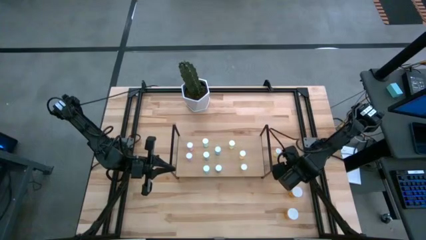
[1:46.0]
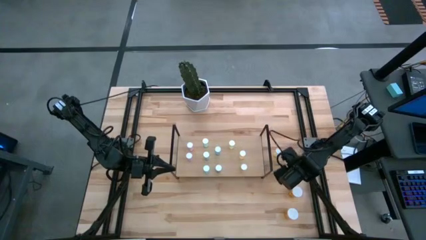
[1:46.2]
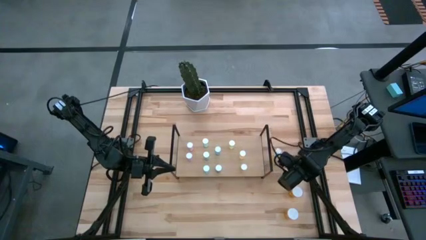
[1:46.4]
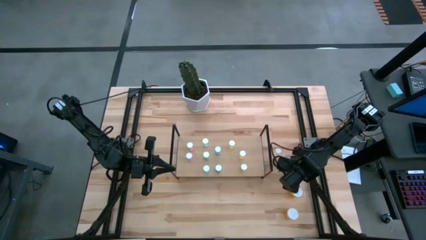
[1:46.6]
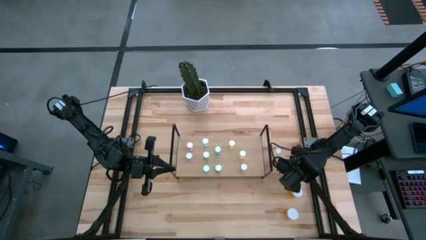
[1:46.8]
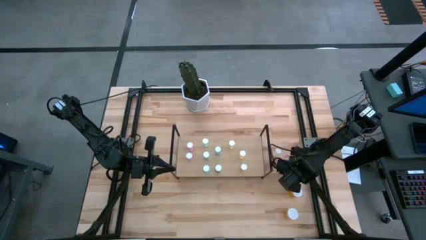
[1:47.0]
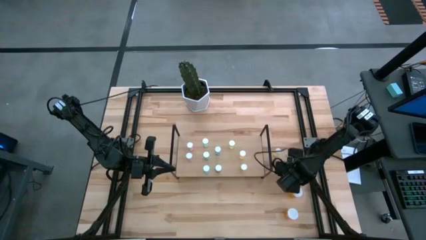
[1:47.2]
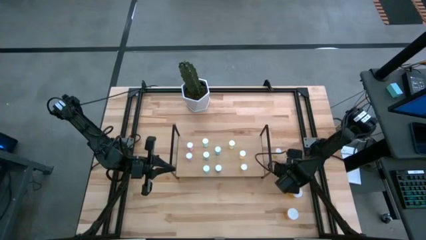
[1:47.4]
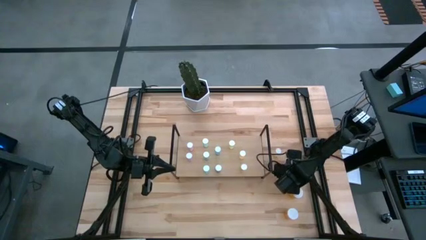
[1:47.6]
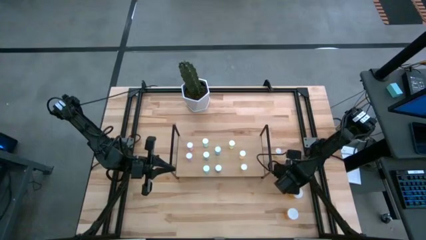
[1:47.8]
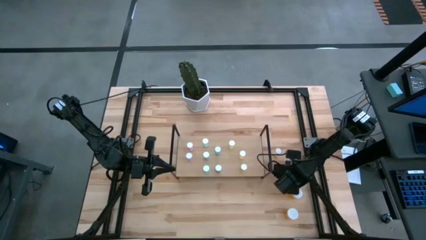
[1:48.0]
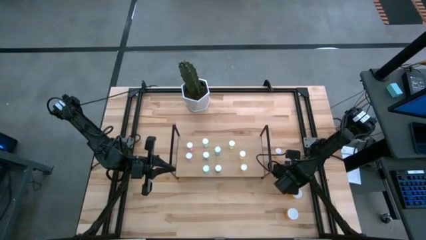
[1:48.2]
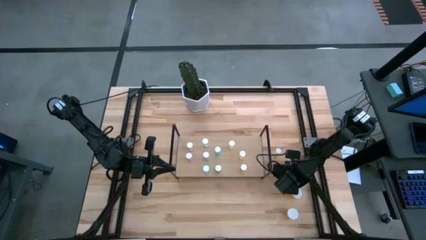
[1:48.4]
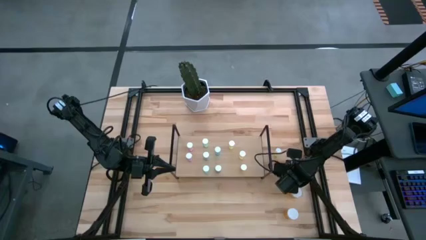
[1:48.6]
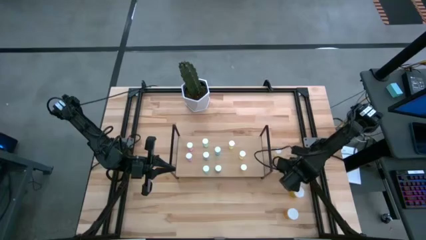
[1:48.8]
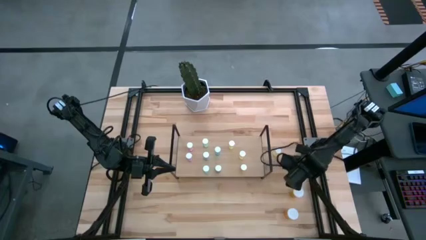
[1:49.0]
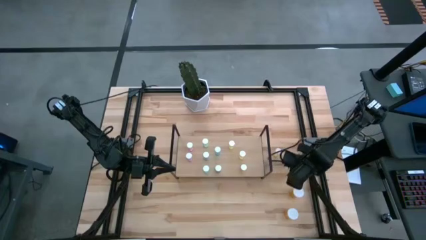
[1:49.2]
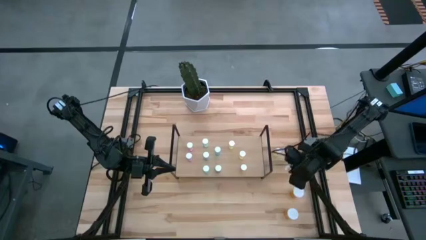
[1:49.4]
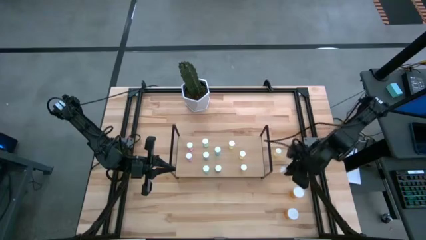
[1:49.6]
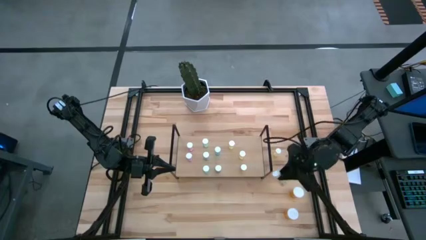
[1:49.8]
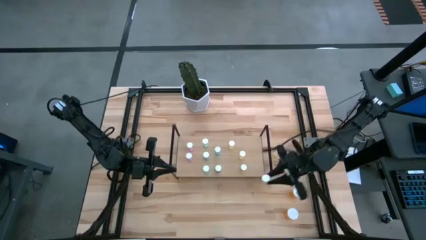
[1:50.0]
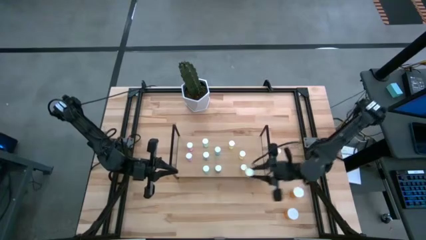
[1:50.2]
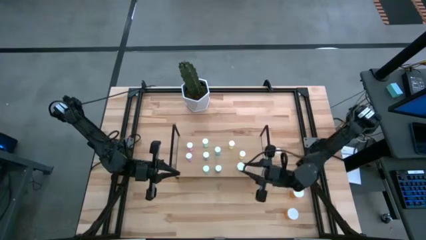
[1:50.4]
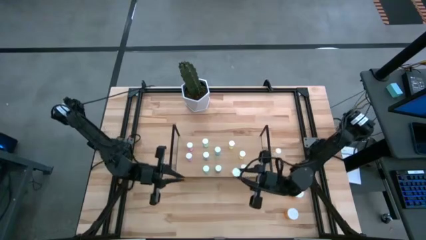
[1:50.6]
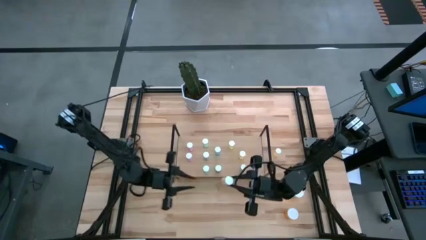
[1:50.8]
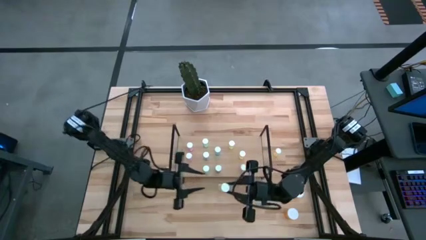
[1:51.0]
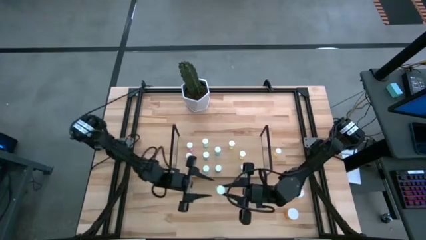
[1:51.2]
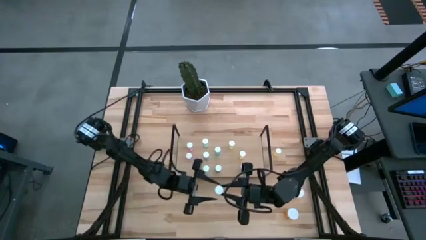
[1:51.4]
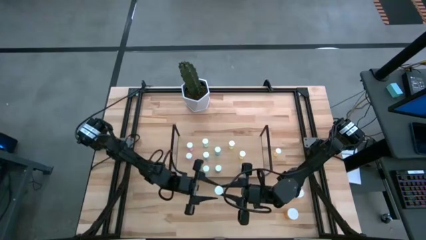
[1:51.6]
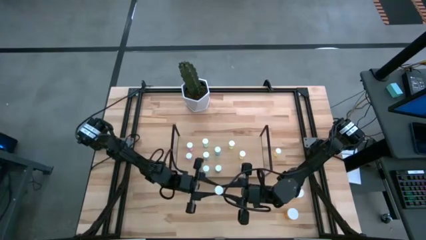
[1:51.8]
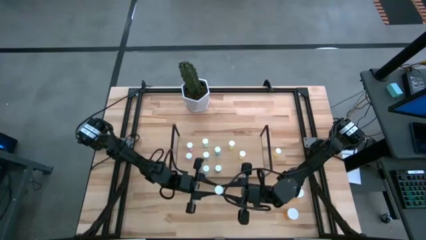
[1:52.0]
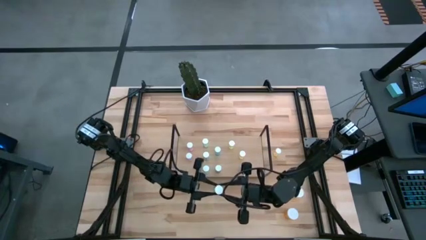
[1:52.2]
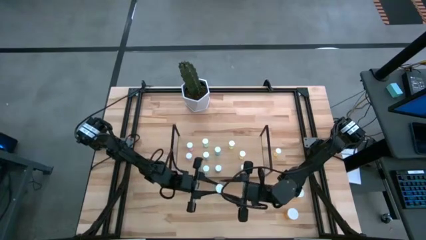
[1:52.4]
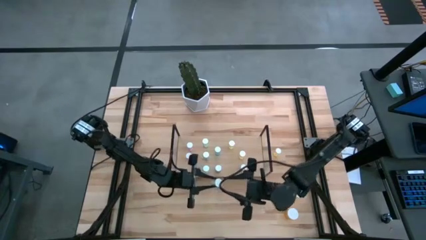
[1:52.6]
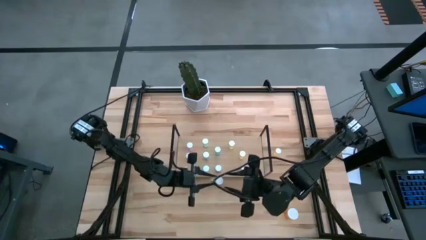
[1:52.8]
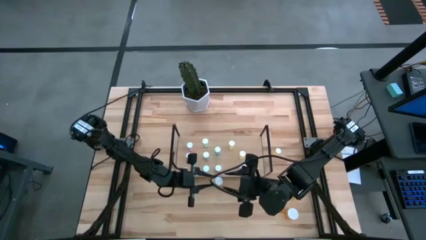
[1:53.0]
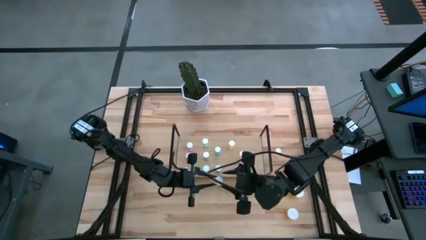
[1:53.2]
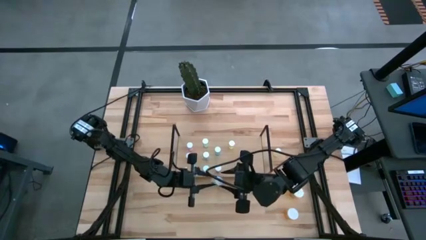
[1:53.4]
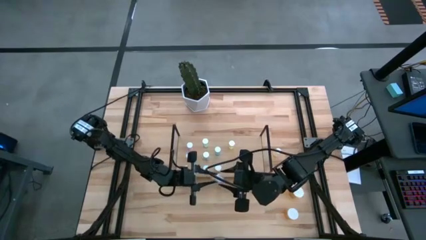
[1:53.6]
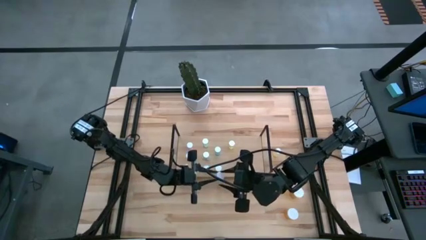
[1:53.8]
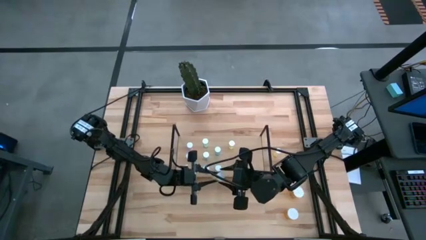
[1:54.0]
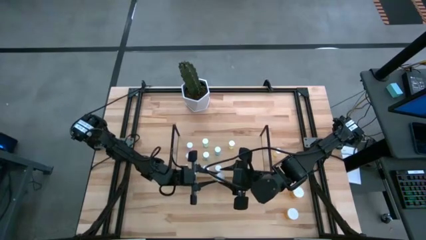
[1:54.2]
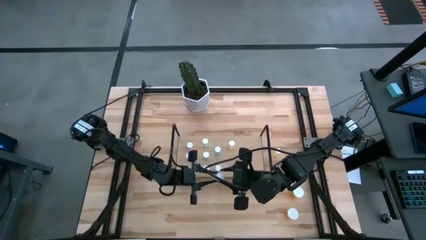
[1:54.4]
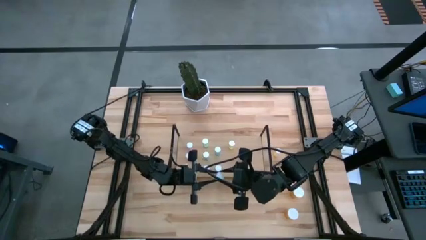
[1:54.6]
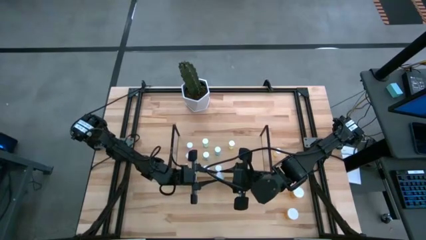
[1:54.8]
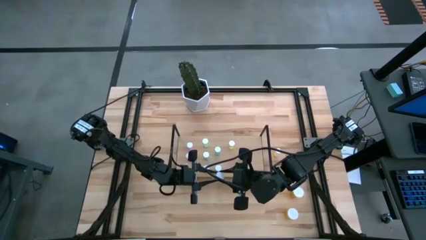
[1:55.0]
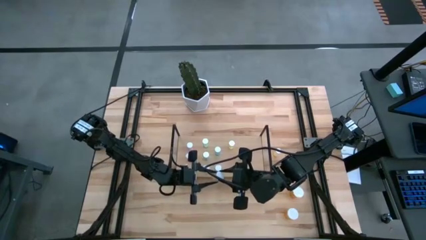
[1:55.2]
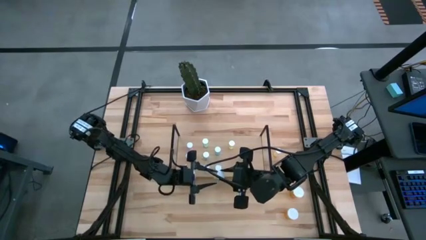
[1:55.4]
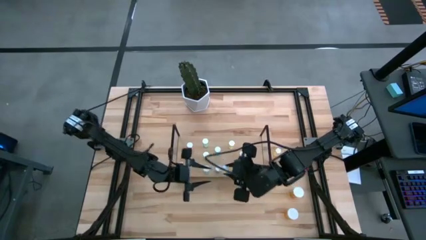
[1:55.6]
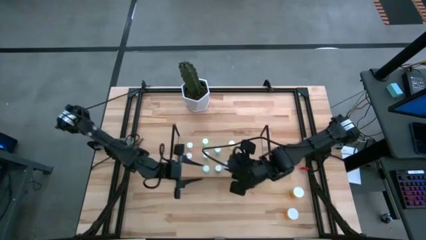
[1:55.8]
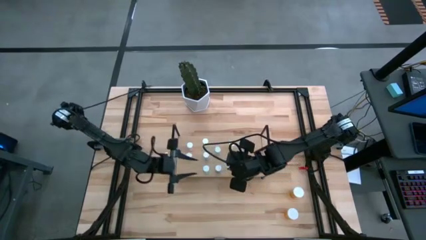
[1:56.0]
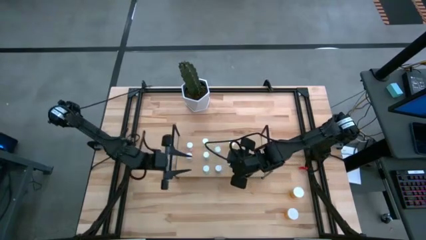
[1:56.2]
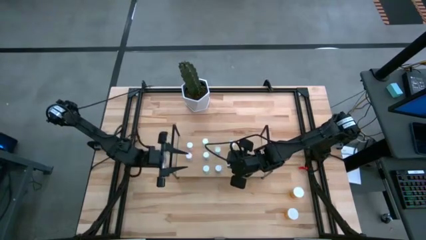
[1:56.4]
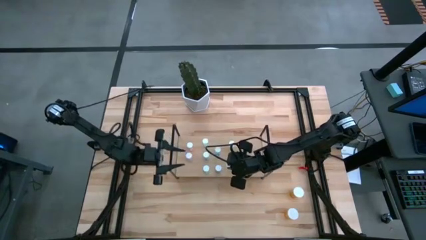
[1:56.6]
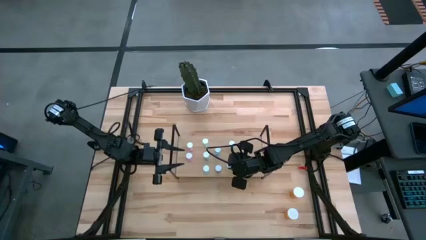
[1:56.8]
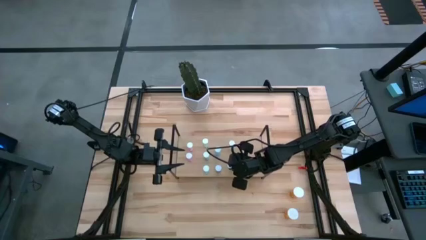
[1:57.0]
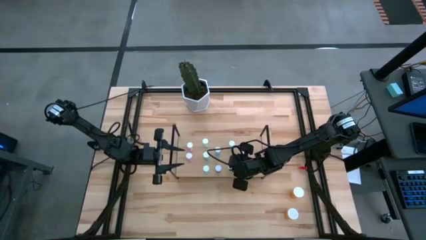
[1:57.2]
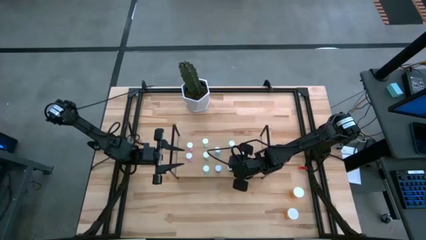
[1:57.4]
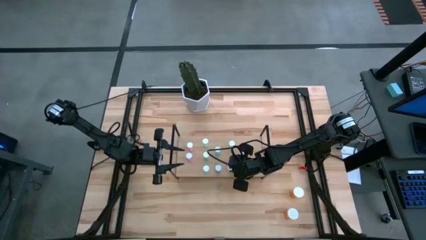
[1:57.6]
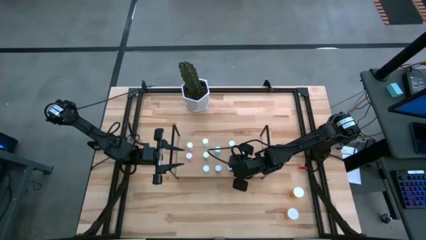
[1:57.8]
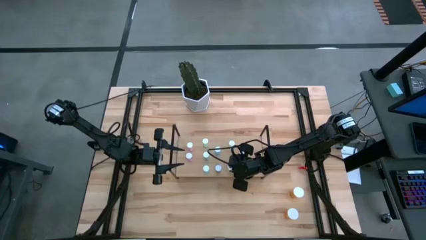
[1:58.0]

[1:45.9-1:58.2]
Task: Pick and place medicine bottles onto shelf by color
Put the yellow pill bottle on the shelf aligned with the other yellow pill bottle
